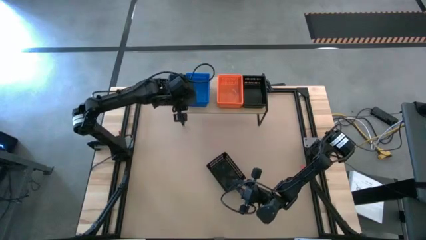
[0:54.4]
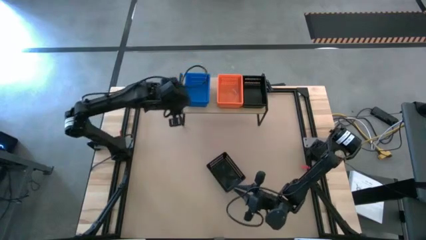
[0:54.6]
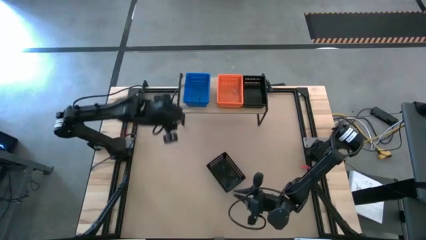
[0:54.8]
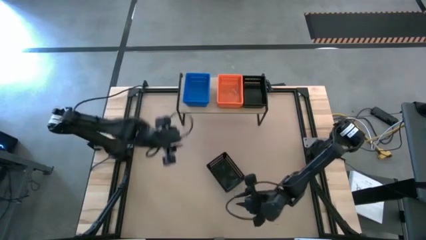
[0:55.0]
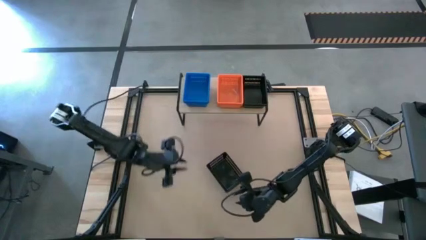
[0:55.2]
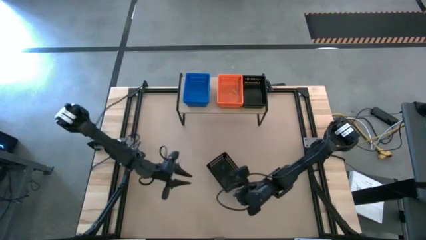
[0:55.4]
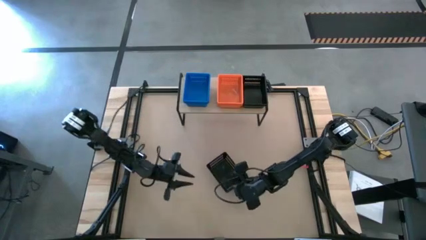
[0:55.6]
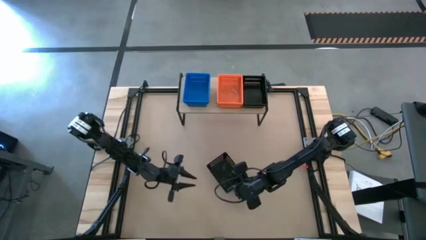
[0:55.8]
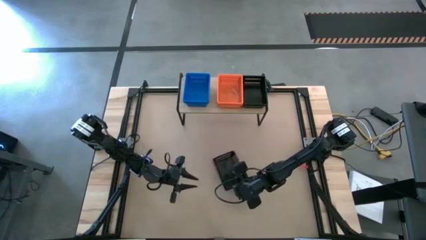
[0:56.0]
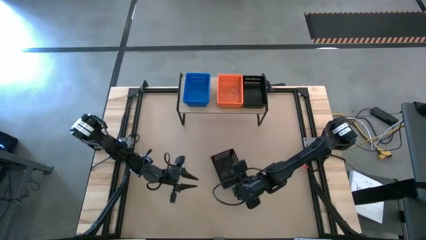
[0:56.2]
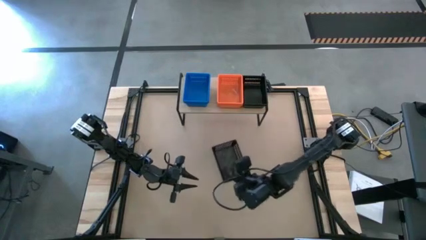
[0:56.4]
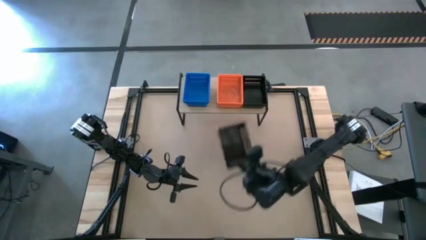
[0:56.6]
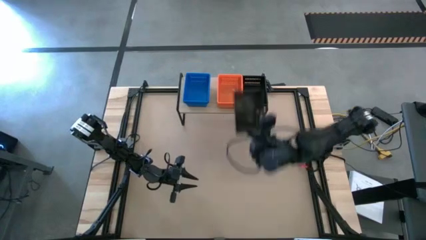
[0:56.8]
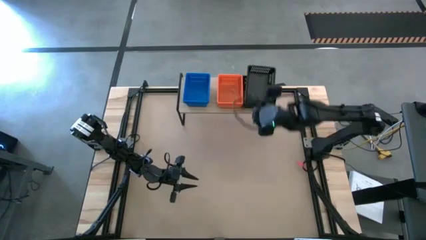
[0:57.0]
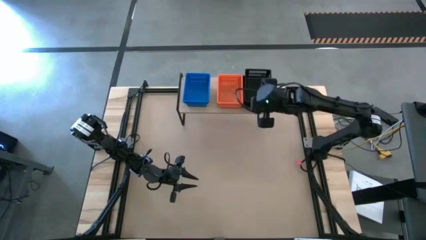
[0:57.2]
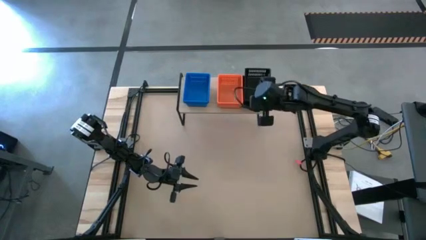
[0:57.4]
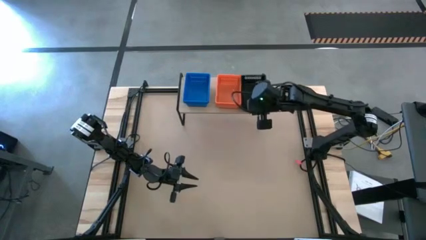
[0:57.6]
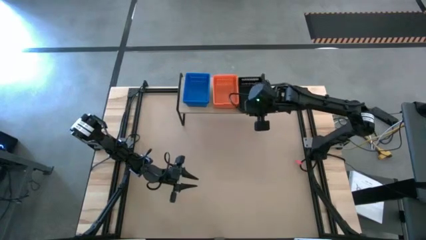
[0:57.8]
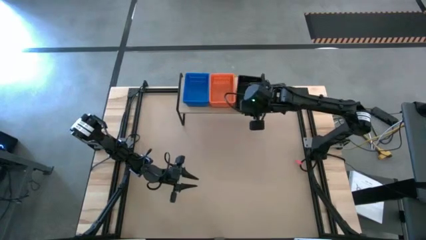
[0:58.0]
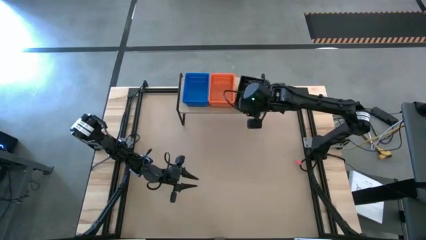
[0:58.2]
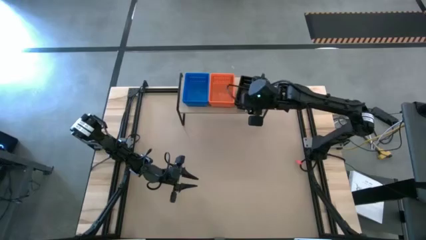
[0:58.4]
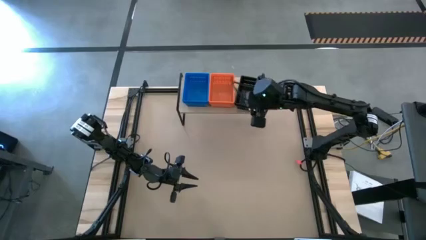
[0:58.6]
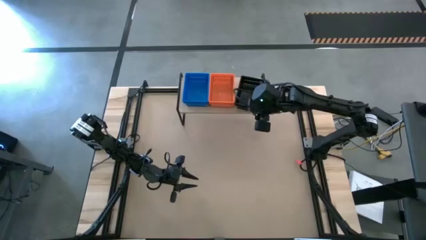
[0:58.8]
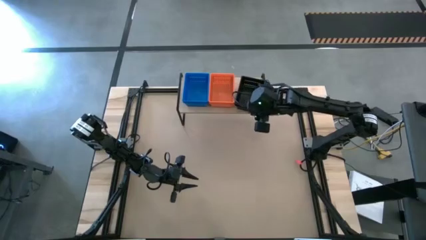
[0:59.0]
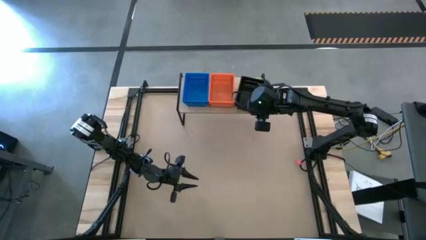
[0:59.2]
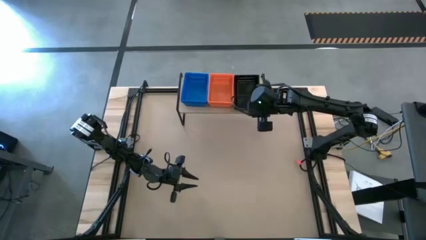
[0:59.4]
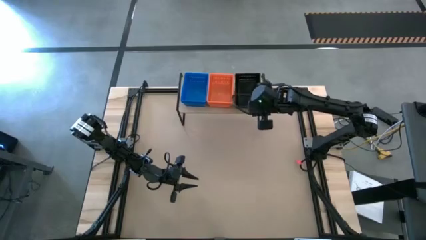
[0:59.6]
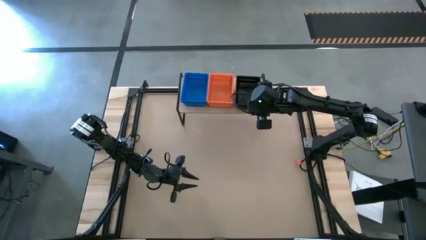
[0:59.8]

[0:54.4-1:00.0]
Task: Stack baskets on shelf by color
Stack the black basket on top of the black basket on the shelf

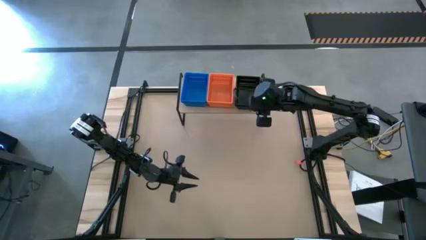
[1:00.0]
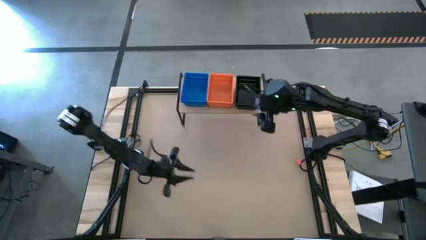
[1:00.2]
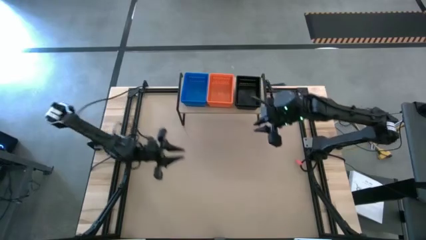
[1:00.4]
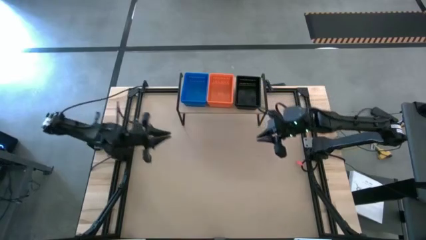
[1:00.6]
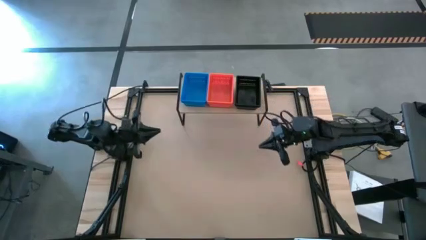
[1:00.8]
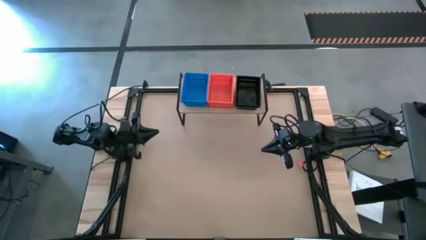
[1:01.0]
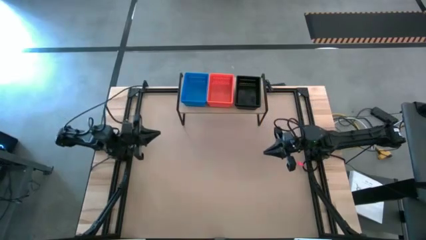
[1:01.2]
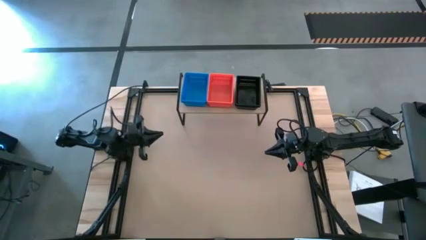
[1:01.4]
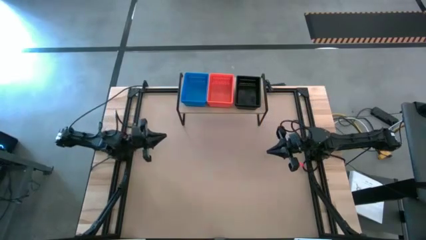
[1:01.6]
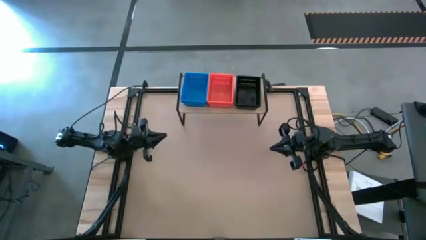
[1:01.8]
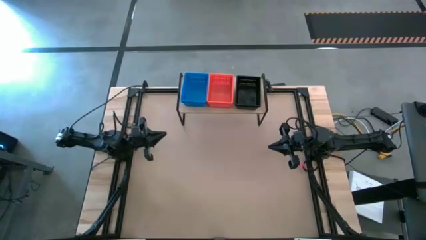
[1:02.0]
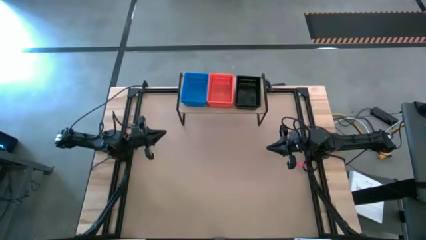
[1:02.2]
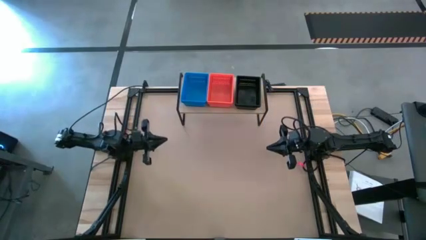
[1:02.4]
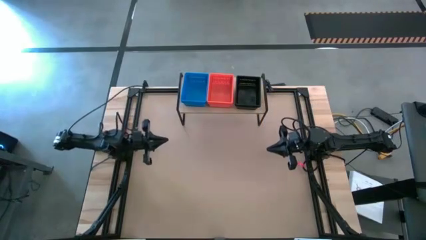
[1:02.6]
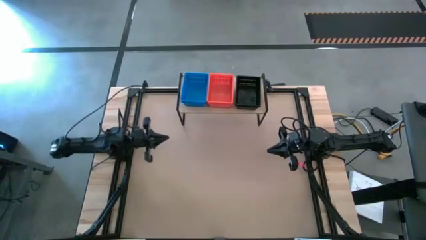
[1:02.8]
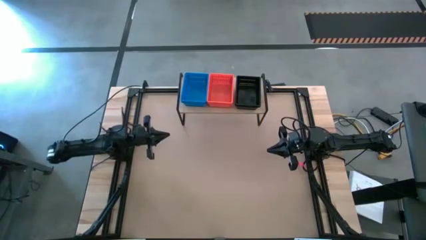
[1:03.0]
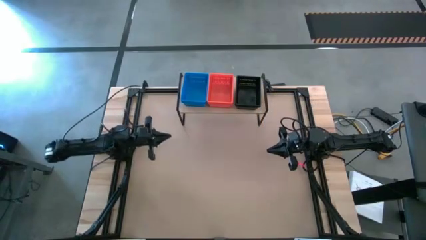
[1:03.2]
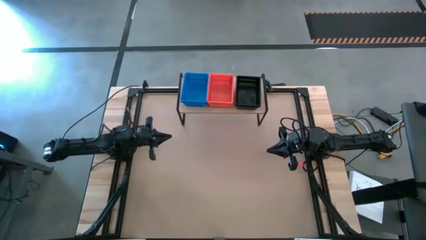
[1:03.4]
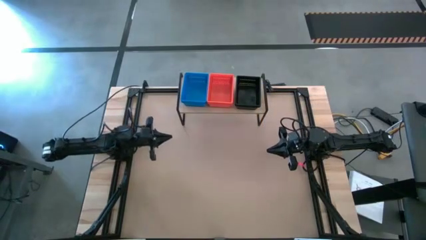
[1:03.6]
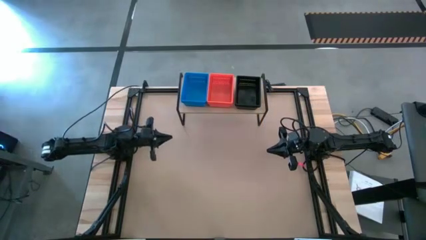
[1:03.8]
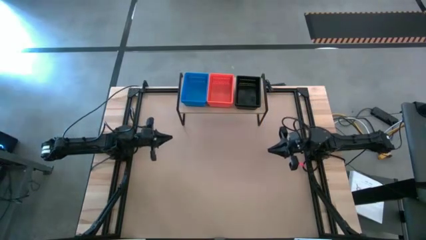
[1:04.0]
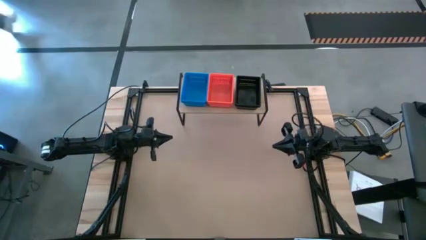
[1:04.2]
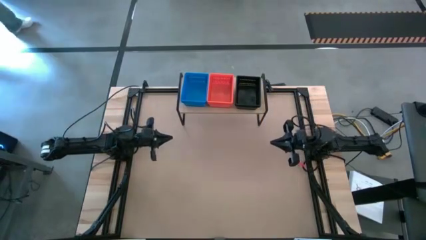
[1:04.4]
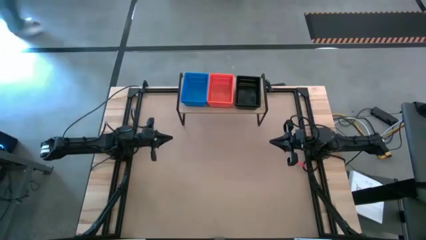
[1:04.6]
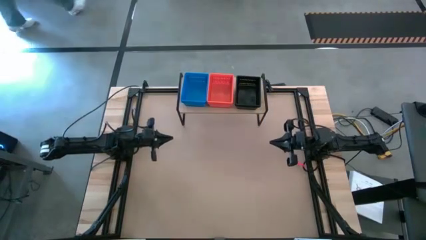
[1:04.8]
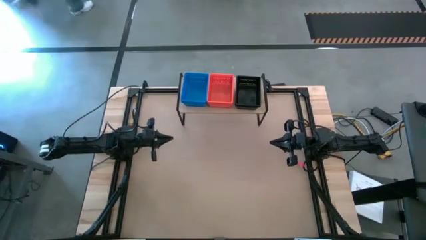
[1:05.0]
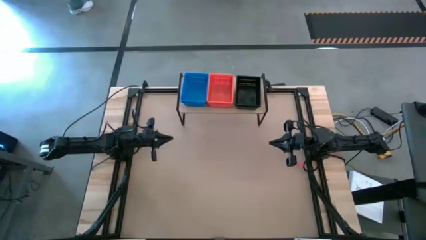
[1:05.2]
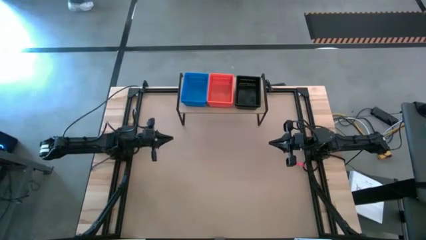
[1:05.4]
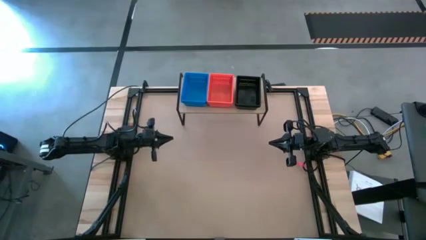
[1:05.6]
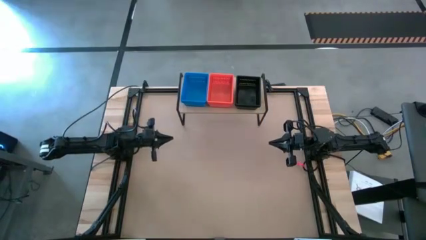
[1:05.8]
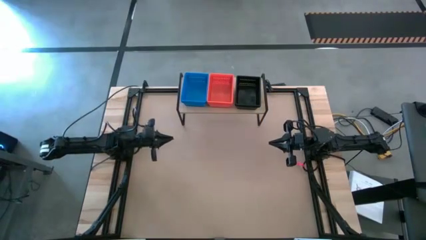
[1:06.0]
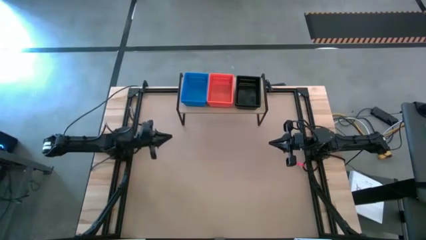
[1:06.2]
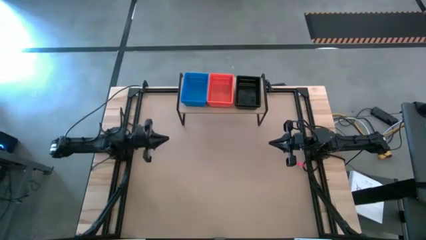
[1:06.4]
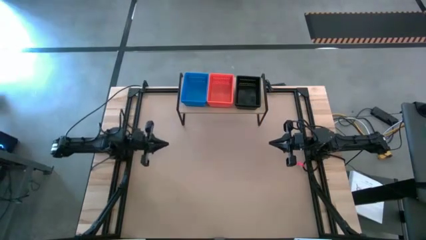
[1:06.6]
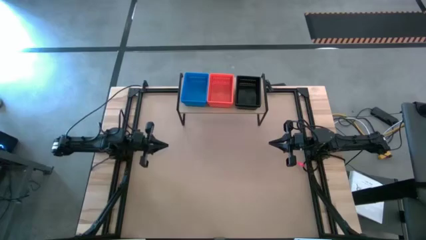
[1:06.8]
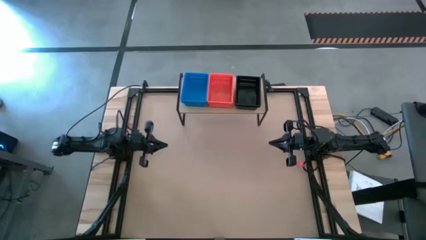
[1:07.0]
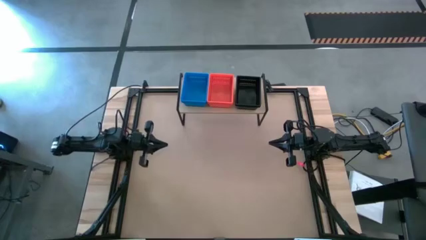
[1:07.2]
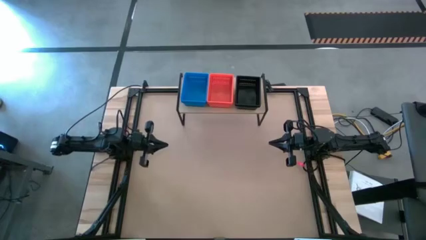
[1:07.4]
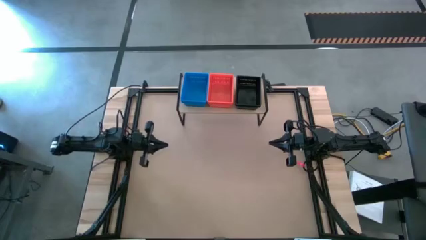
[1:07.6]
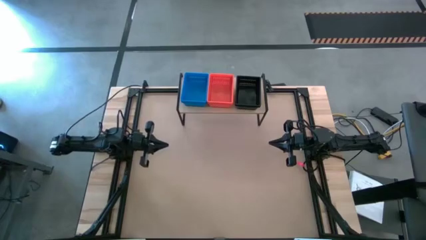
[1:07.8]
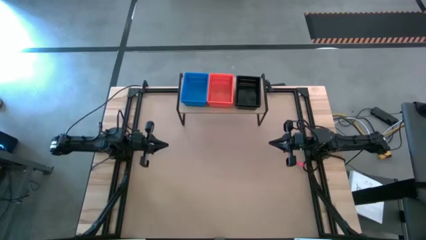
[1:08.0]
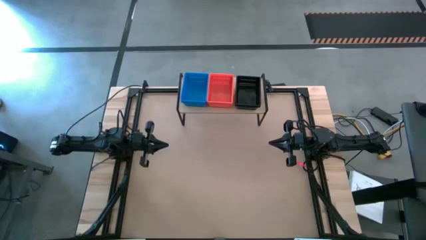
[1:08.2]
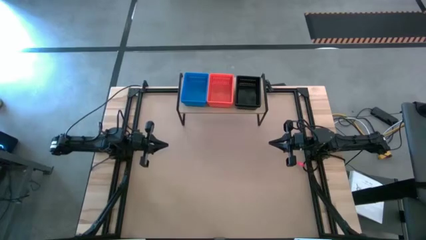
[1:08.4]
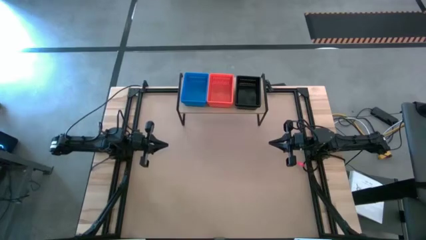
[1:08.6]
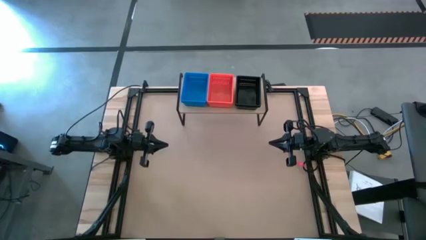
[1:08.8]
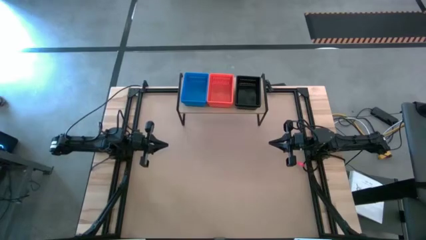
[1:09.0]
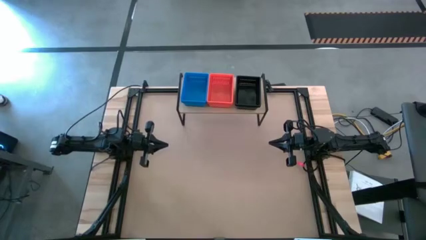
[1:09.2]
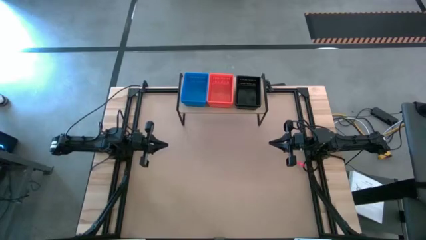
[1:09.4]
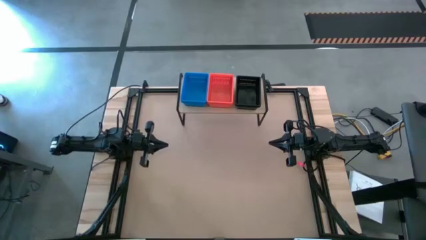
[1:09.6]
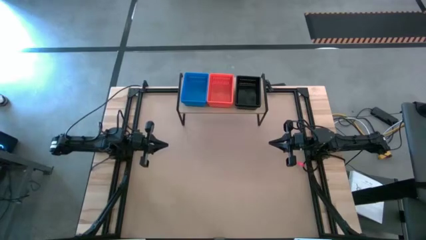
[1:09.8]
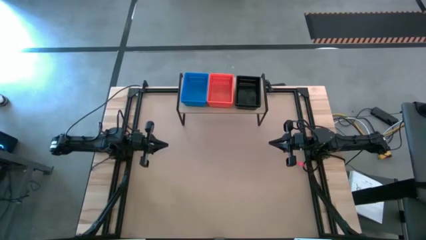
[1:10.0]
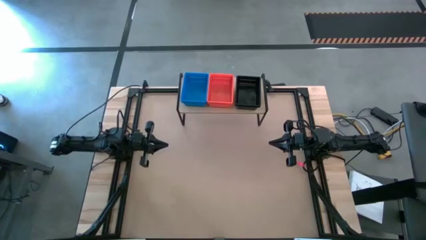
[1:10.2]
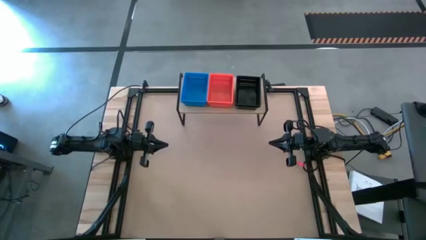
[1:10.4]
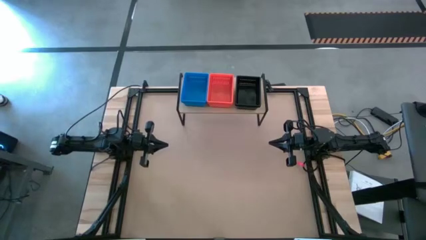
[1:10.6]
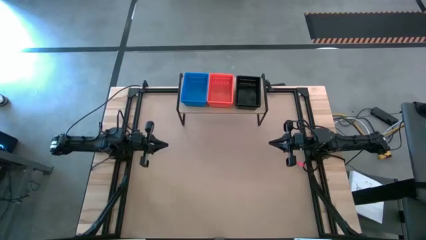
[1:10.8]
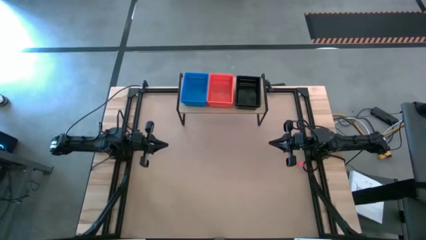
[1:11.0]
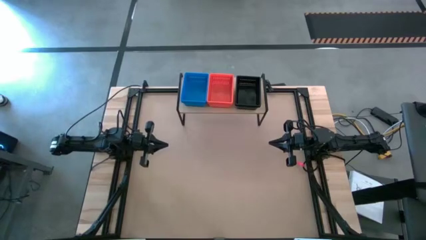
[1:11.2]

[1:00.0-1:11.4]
Return to Home Position
